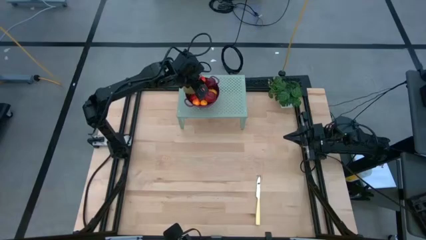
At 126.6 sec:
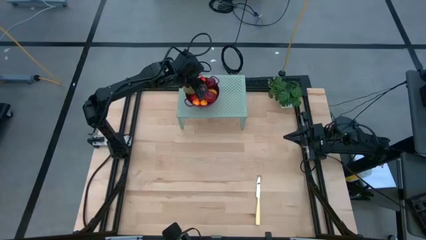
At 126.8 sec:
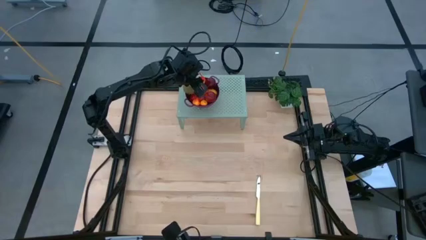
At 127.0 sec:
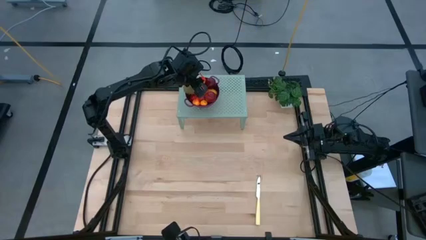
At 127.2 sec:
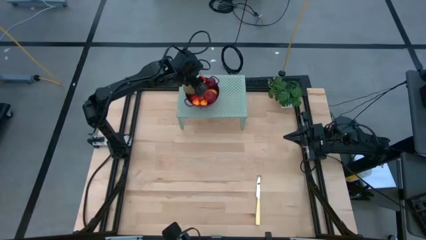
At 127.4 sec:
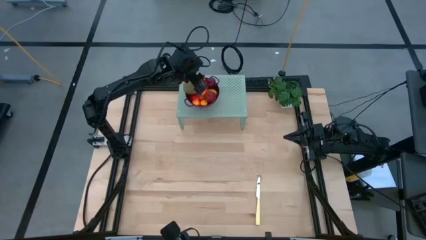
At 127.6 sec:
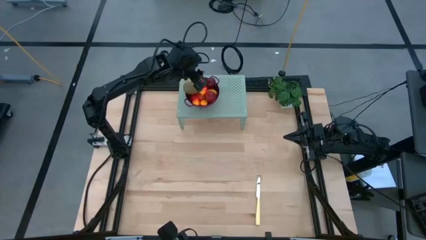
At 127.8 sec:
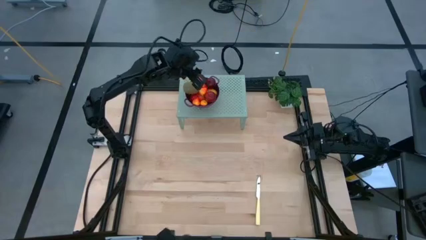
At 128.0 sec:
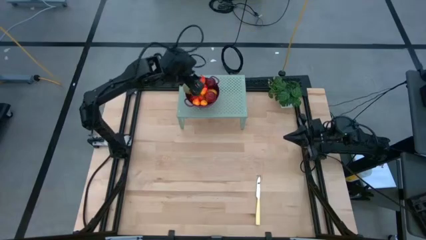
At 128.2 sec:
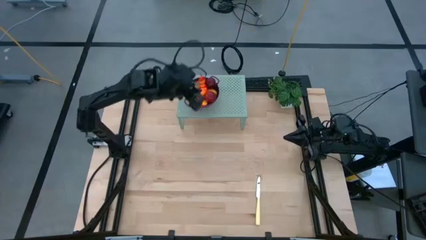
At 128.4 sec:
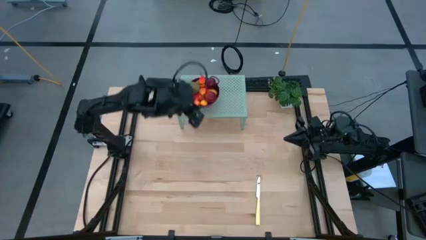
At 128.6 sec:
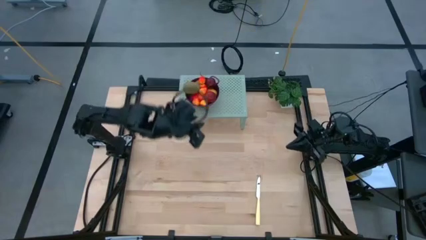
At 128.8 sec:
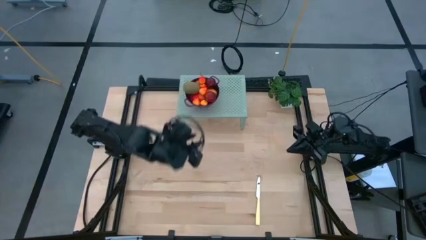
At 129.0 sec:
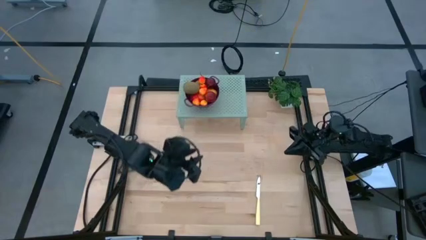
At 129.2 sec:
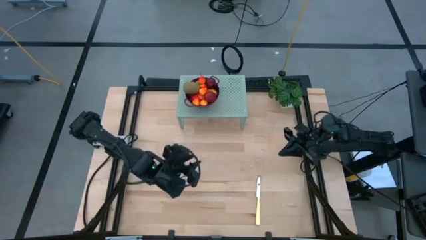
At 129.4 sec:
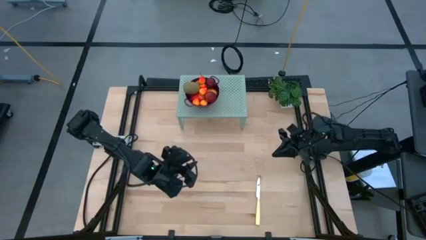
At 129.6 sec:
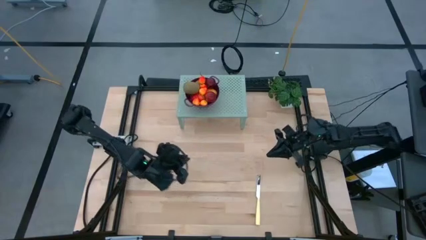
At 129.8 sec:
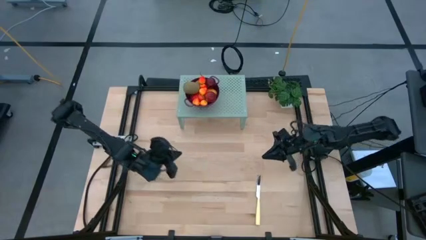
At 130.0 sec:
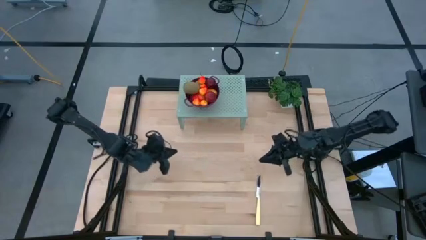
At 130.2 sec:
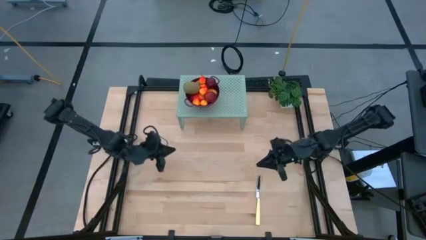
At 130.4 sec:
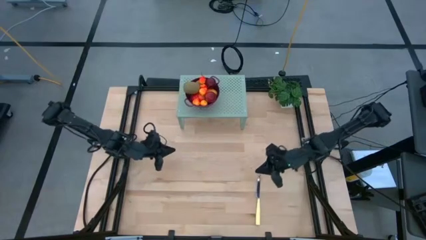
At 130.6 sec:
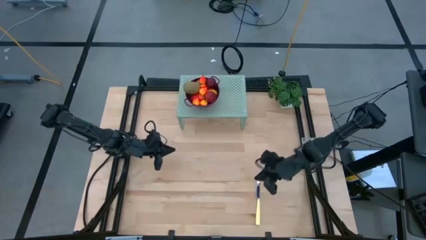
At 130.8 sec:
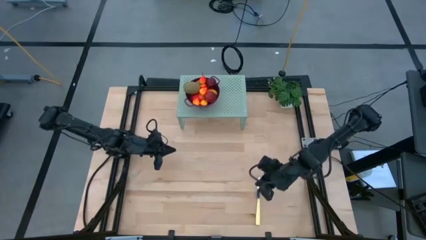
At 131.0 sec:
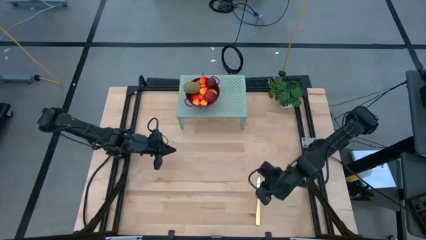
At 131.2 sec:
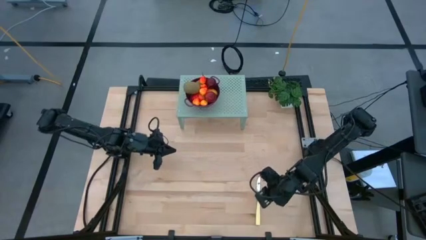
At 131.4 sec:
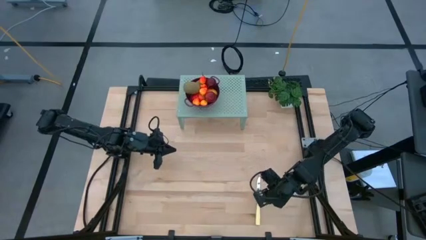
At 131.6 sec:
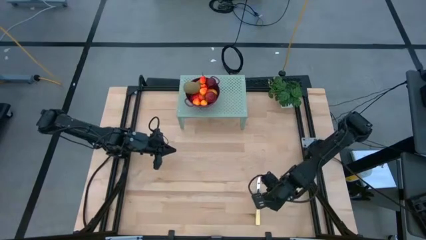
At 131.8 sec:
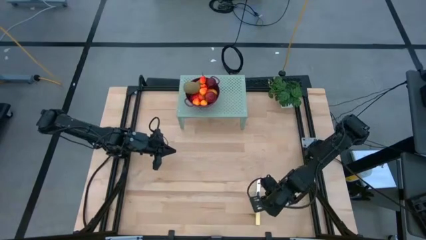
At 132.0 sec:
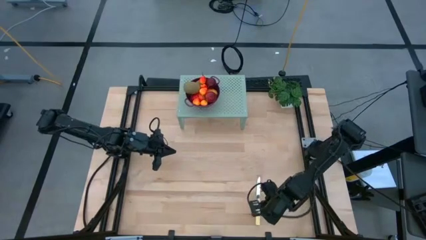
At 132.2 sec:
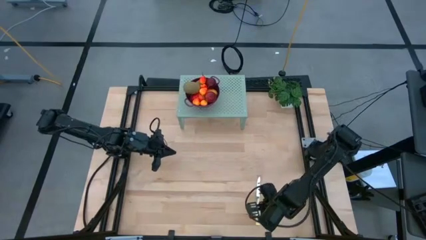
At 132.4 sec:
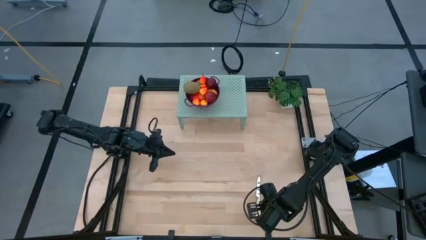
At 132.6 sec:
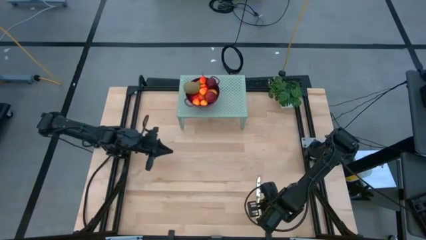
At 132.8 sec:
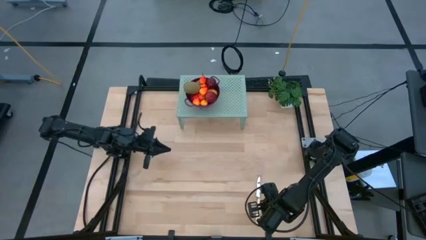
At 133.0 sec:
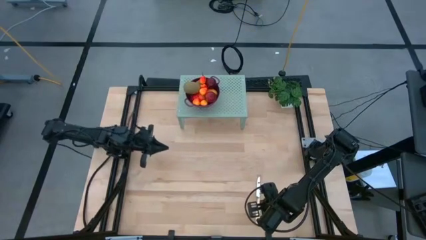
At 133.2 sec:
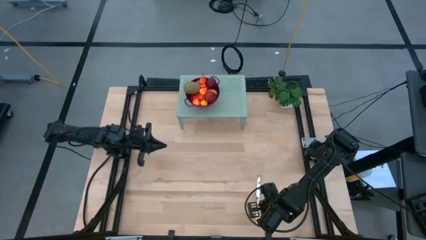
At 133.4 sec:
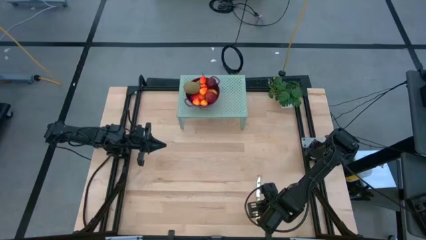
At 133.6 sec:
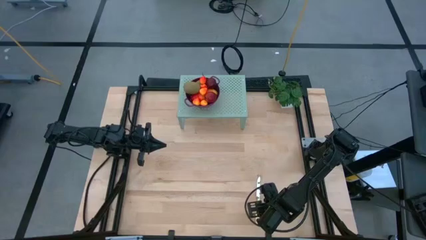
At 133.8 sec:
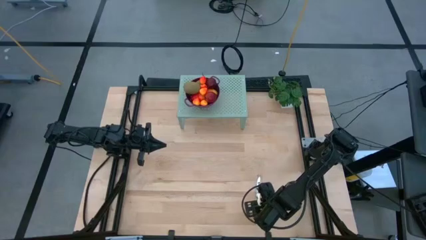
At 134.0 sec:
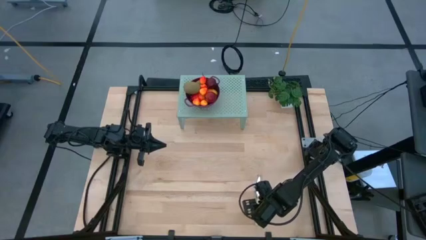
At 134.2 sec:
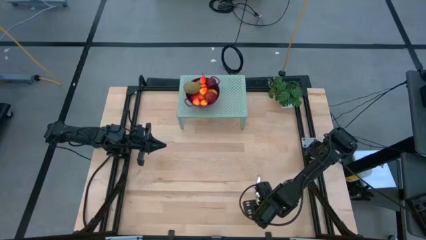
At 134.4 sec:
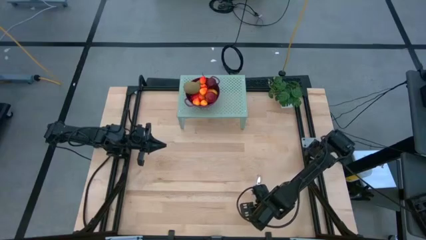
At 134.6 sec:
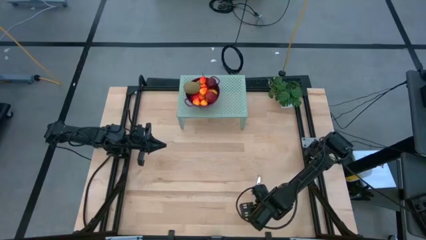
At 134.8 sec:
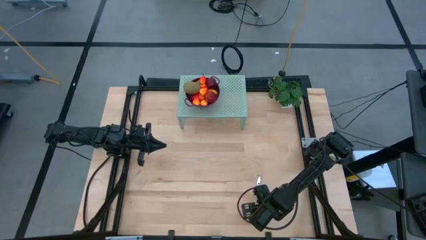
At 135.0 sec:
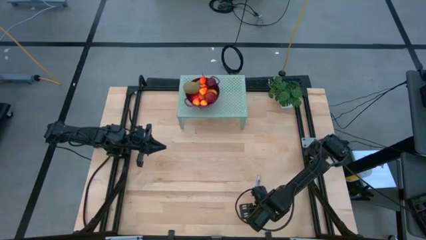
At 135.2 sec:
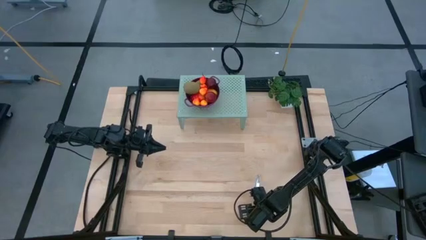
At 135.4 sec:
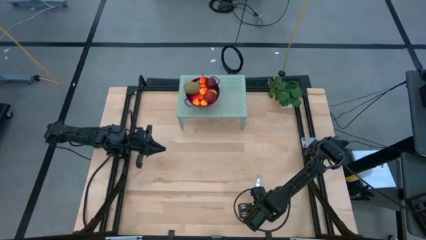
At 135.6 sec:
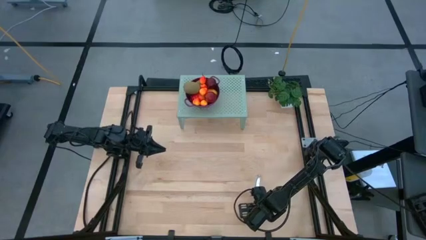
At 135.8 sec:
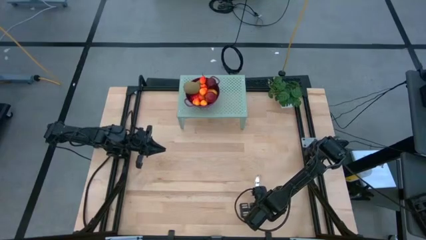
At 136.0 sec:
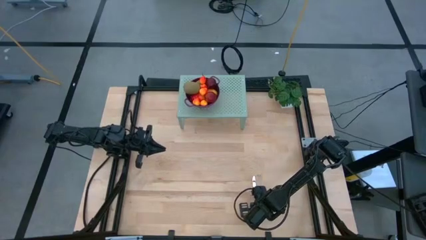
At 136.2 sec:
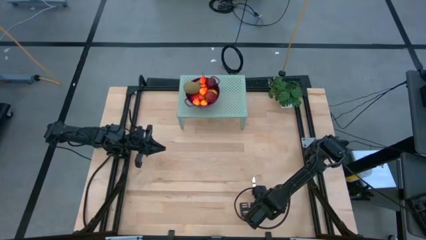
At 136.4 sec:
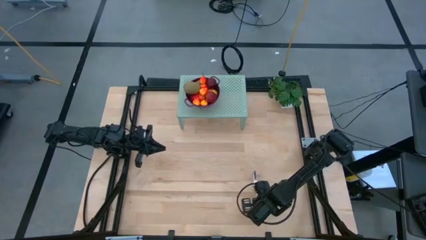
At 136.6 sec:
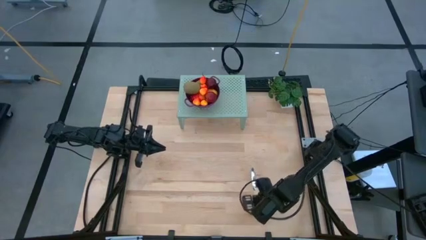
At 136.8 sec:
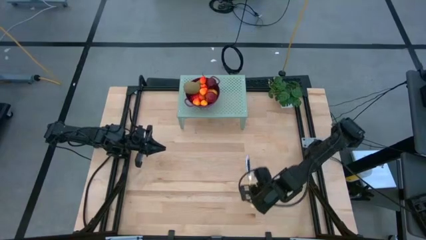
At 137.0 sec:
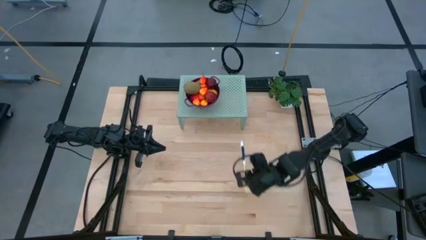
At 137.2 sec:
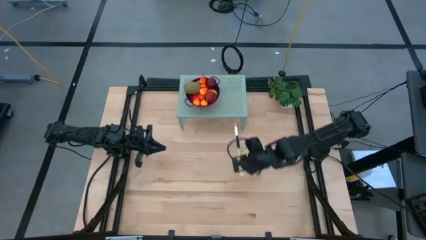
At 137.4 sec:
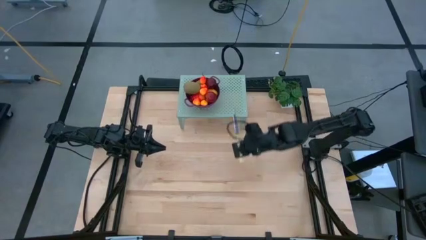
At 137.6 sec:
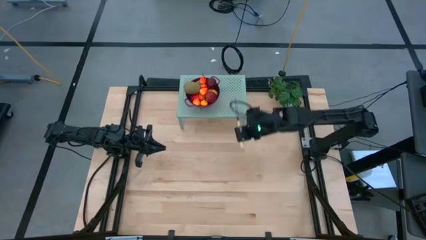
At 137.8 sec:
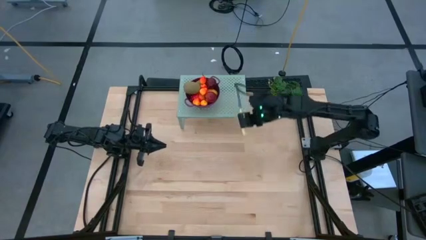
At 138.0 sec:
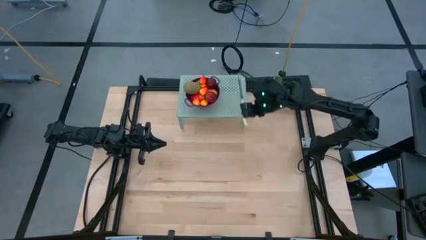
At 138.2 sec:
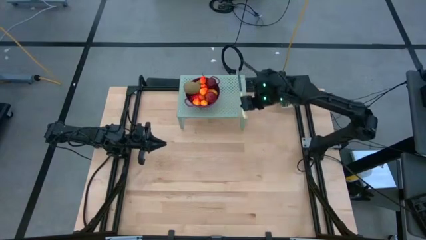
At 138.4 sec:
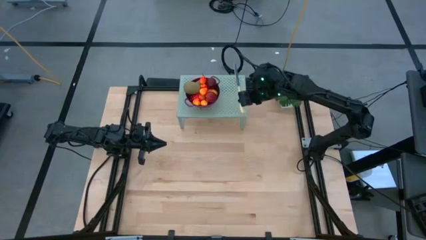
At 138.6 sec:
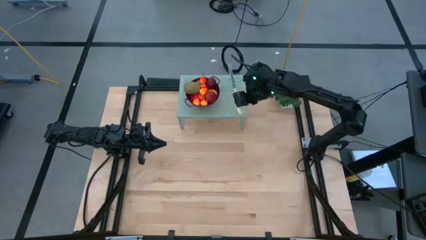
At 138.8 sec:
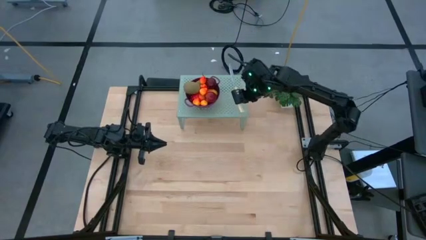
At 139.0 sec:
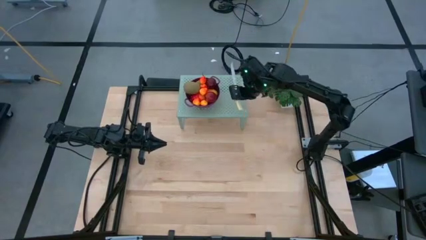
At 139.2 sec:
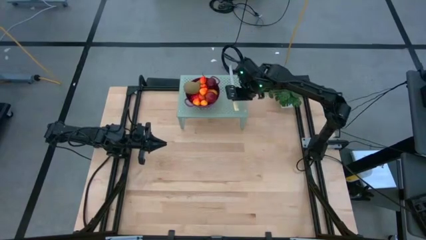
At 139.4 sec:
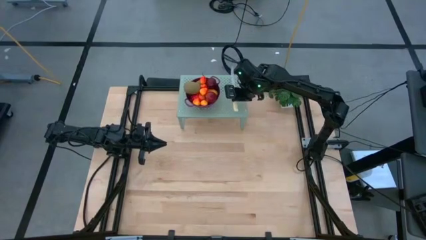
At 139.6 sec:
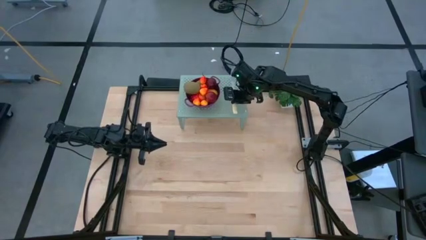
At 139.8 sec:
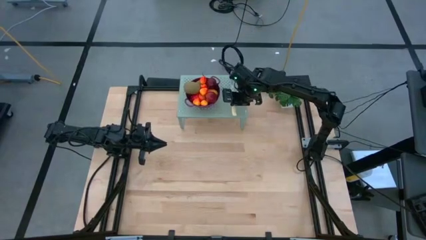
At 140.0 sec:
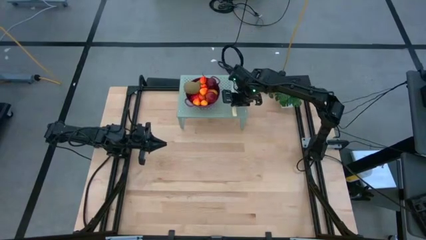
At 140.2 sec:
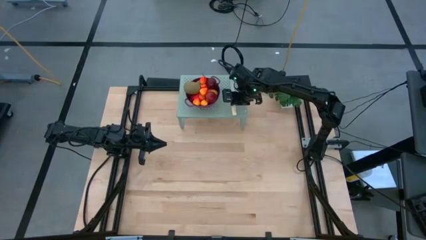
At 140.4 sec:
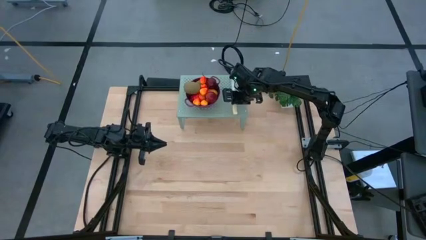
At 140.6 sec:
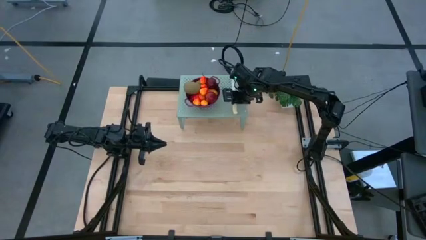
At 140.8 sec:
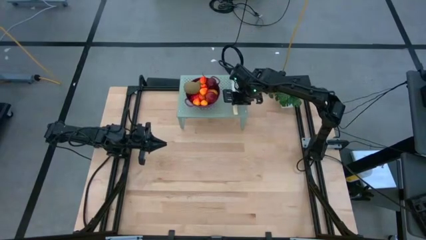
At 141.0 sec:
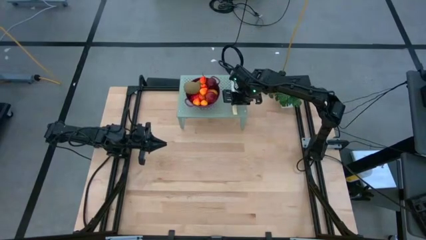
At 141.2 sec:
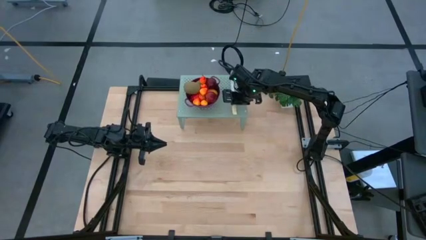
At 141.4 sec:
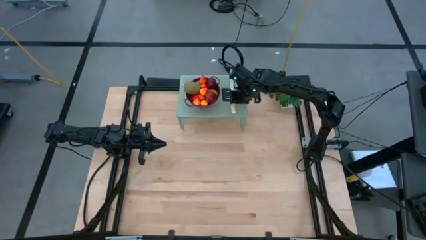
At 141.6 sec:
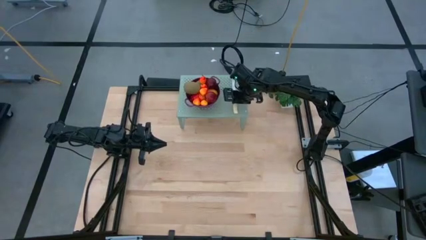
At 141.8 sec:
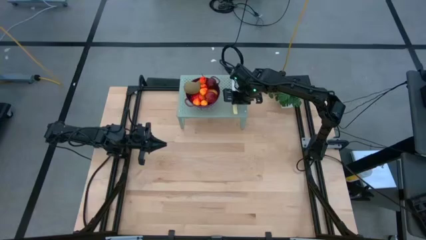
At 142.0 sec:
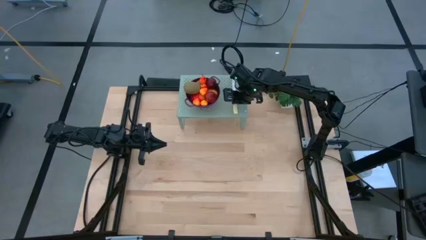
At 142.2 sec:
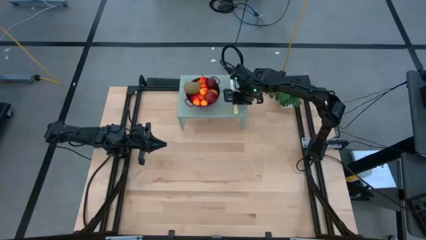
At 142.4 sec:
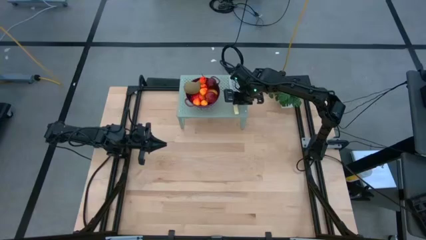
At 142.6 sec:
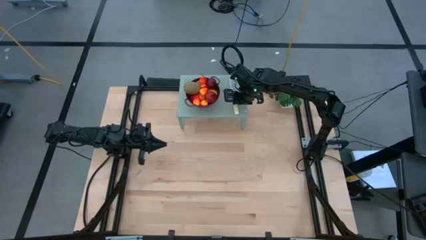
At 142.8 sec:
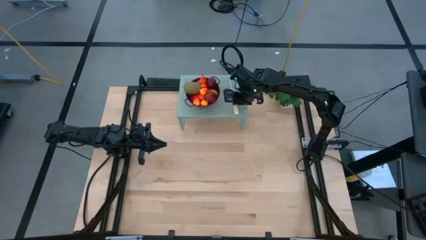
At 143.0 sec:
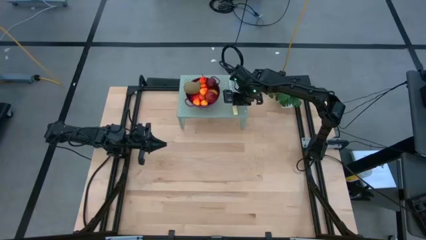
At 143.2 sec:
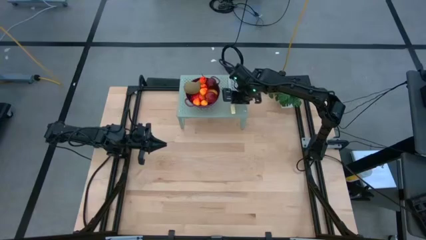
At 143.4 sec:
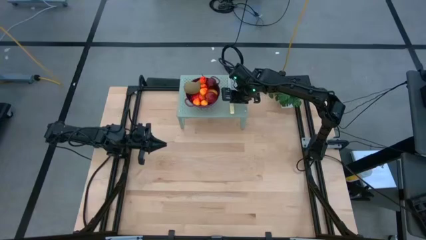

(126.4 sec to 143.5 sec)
Task: Pick & Place Fruit
Put the yellow knife on the shelf
